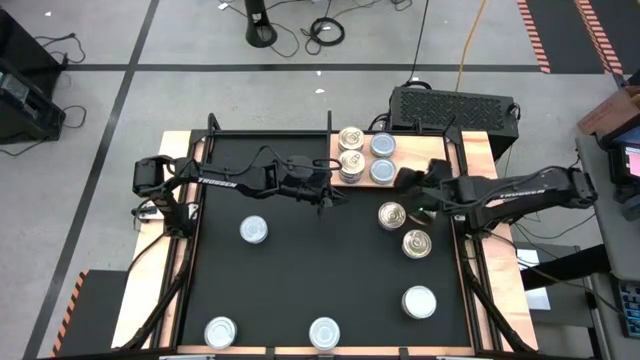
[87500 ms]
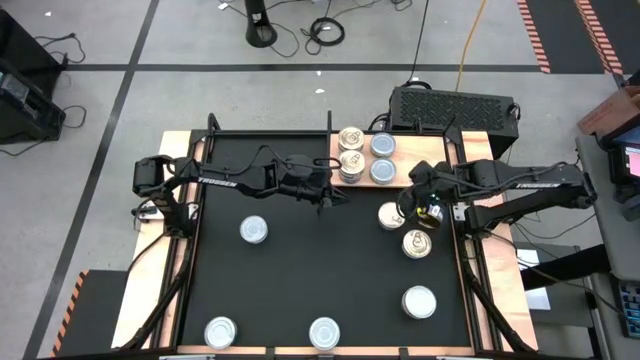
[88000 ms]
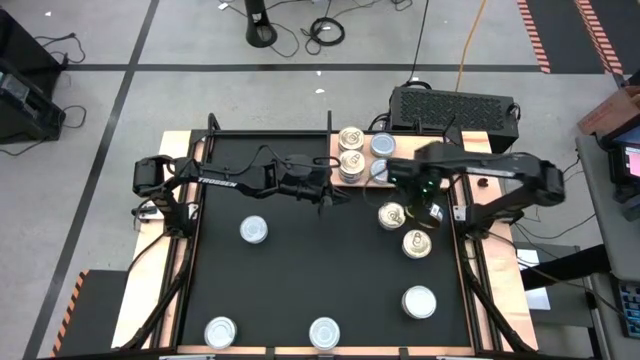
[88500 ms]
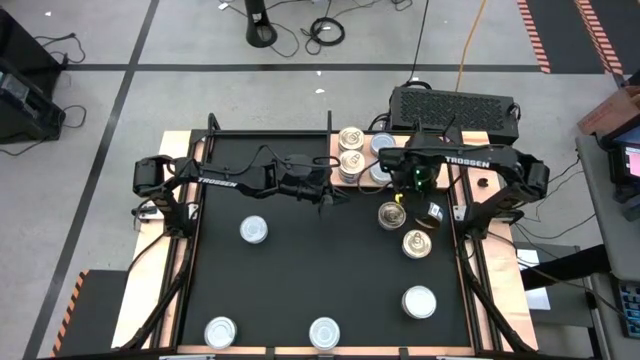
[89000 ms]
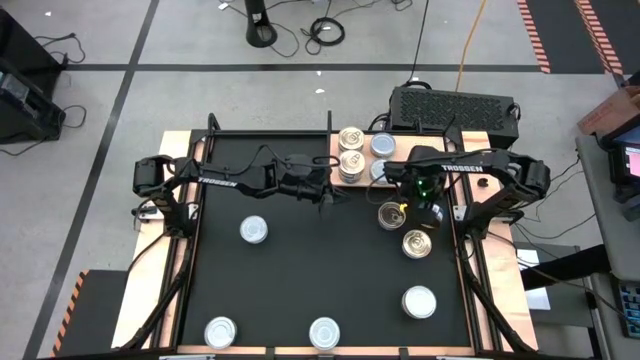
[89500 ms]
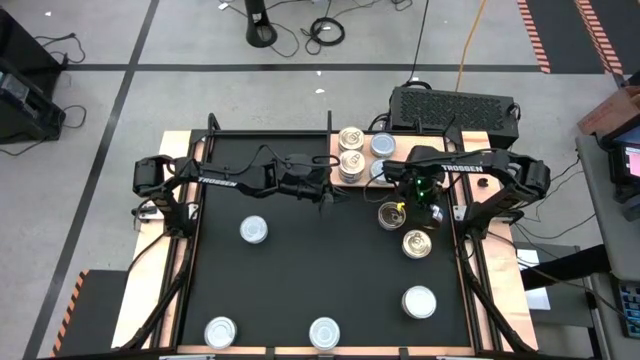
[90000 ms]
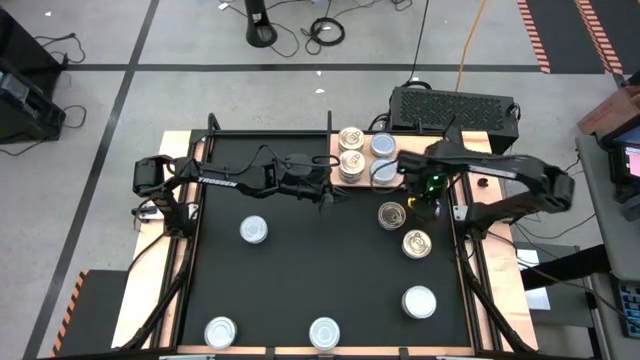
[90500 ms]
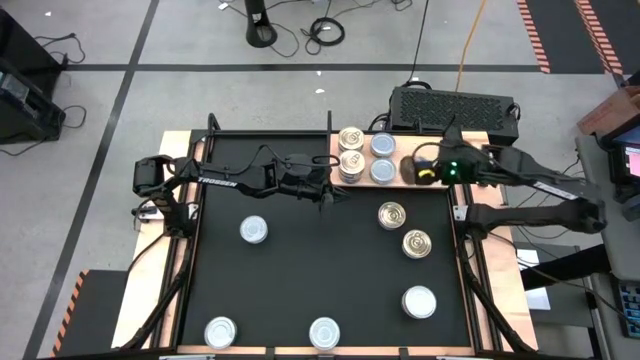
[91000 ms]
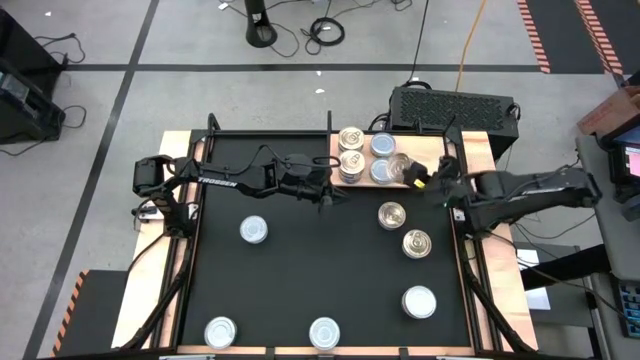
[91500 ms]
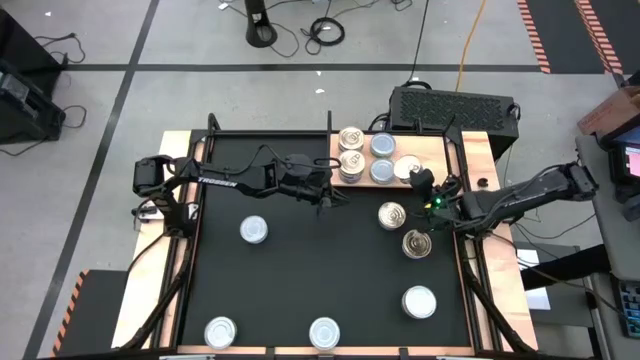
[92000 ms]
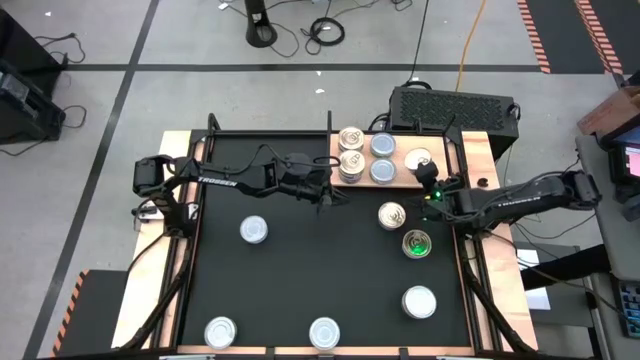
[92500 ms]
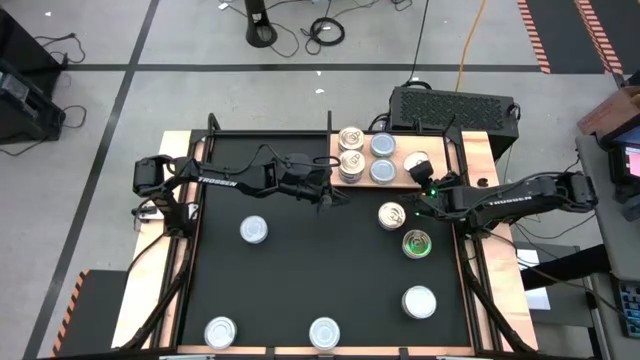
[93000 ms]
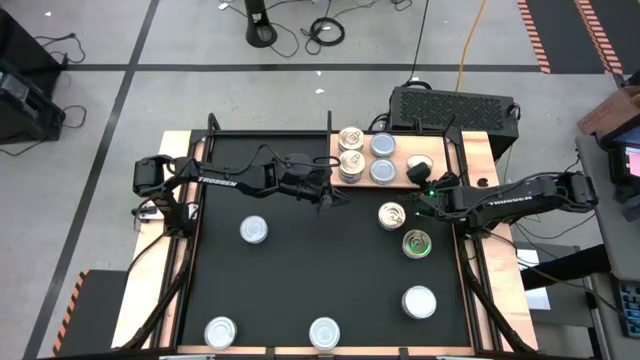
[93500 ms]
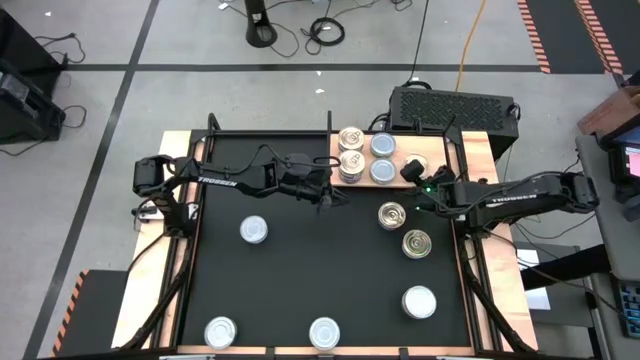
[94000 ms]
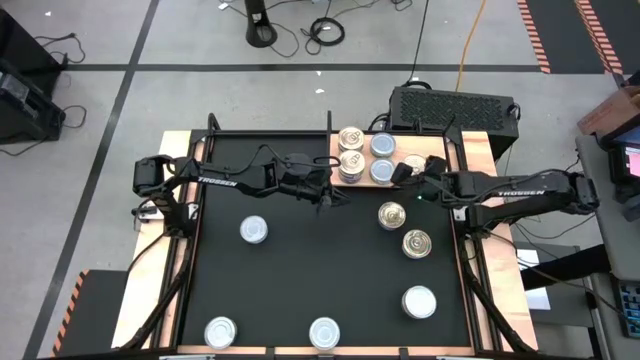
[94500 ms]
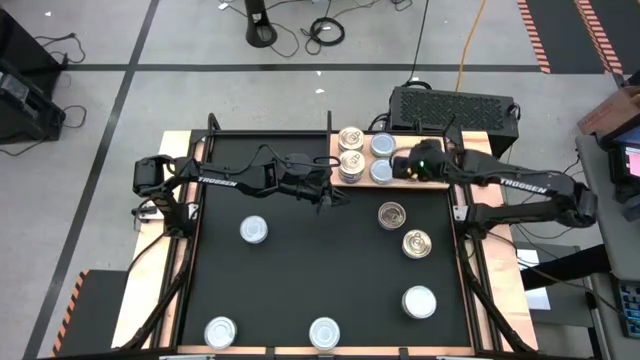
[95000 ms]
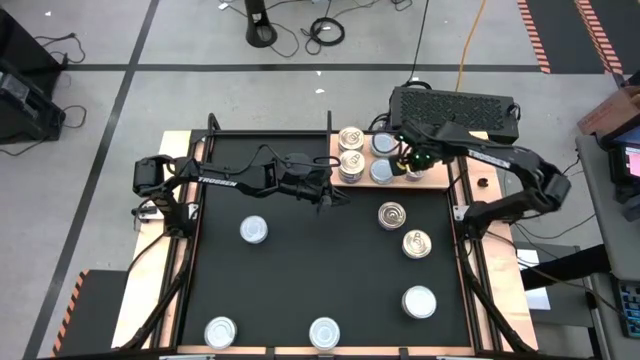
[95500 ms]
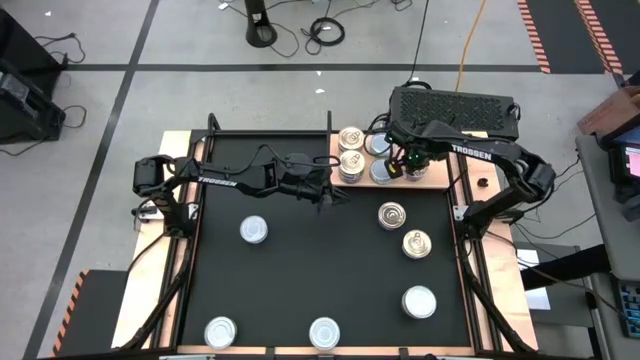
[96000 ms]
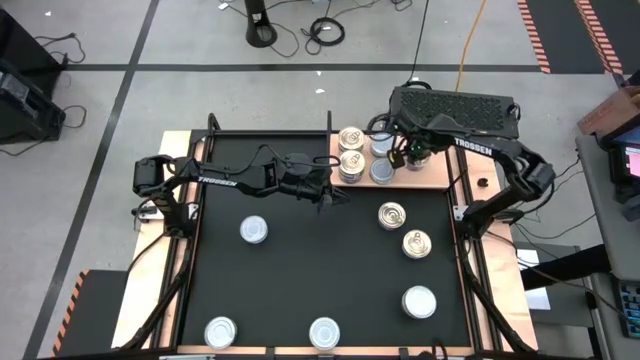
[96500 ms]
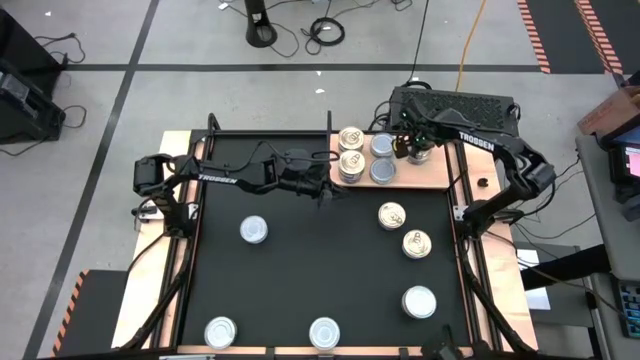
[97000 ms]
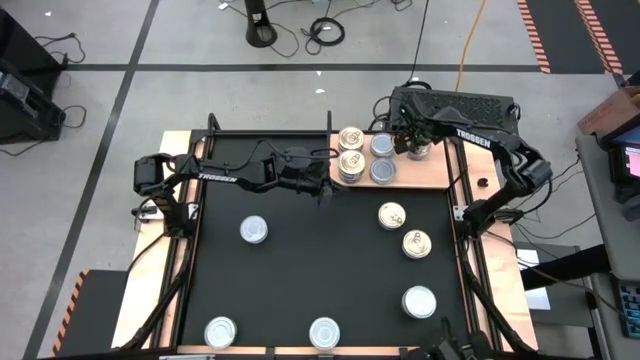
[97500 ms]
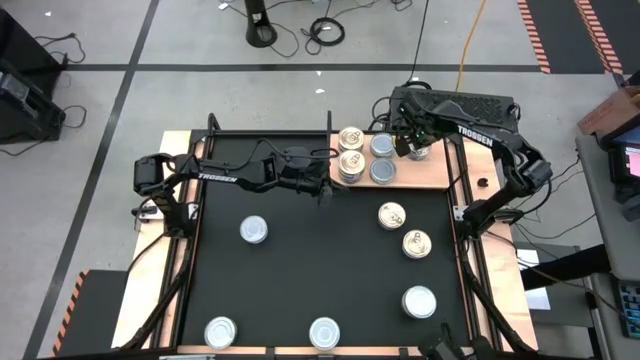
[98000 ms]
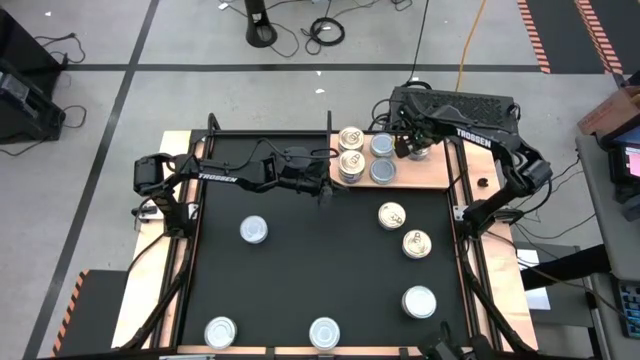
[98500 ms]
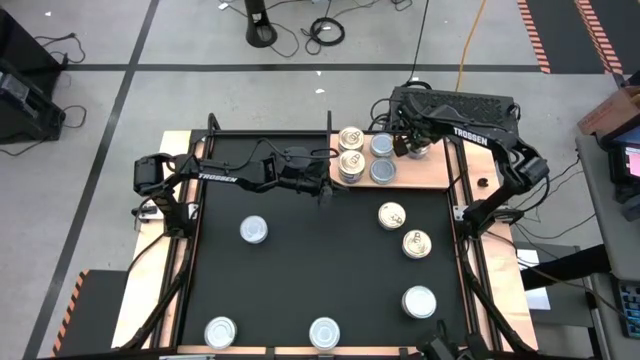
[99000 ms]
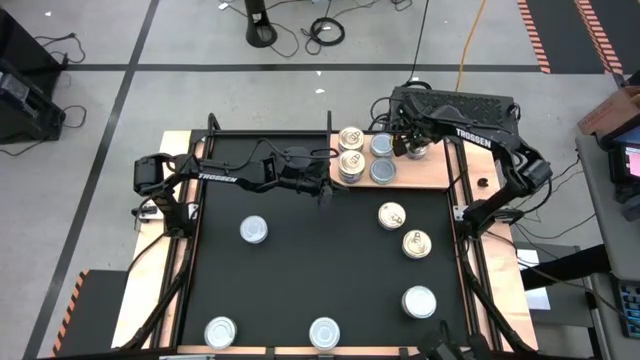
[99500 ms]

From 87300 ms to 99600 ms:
Task: Stack canned seafood by type on shelf
Put the blue pink tuna can on the shelf

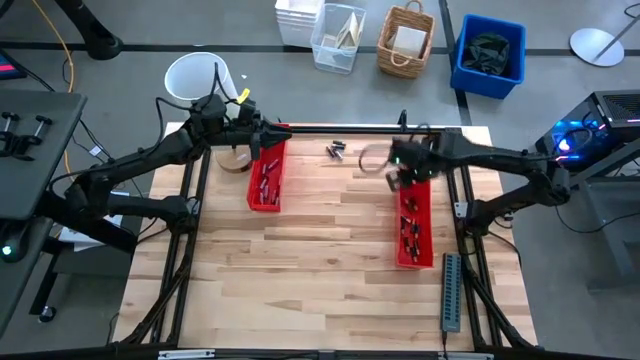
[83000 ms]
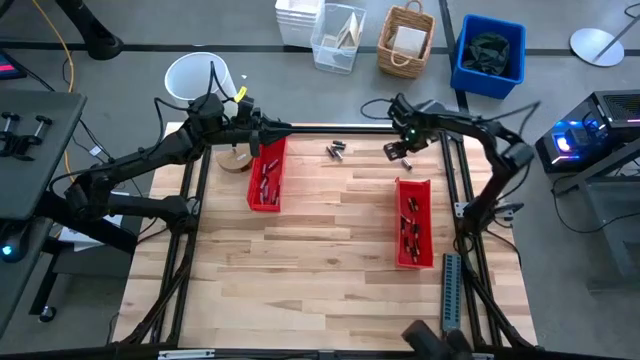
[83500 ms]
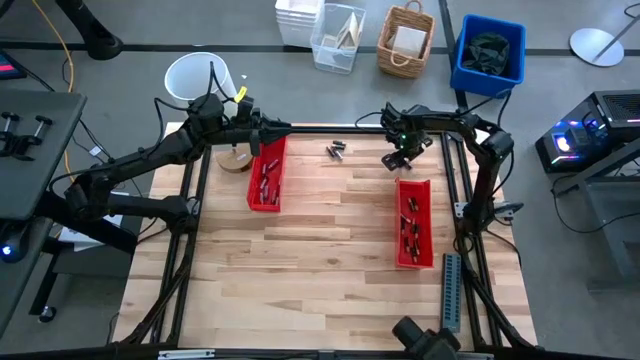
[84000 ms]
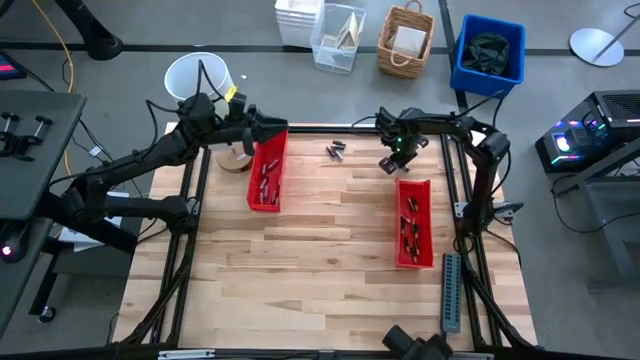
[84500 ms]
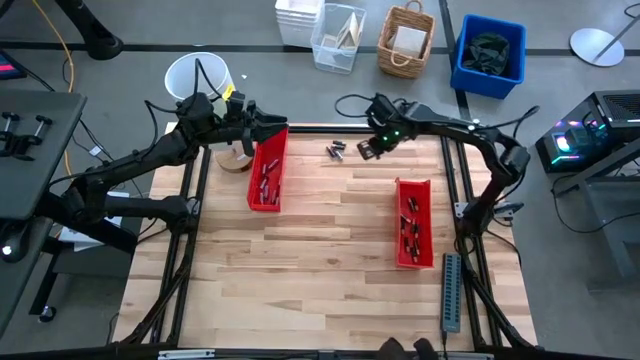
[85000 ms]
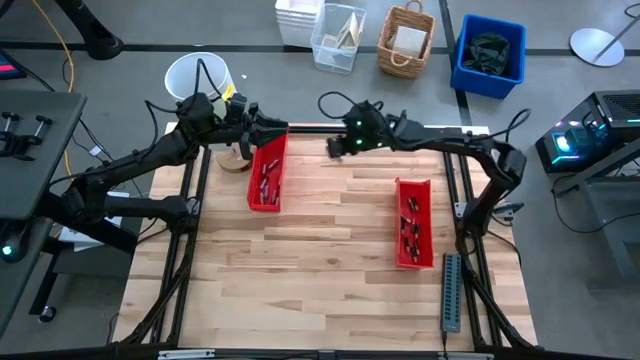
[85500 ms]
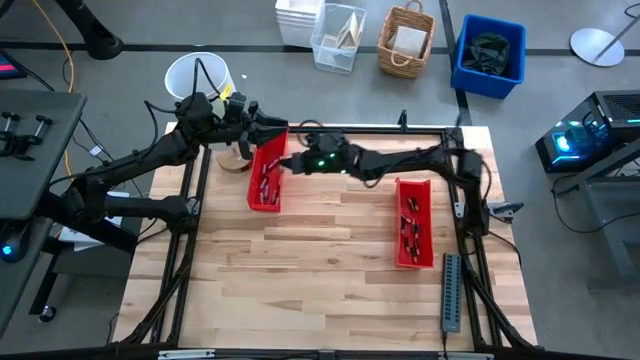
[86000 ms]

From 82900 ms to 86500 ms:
Task: Sort batteries
Put the silver battery into the top red bin

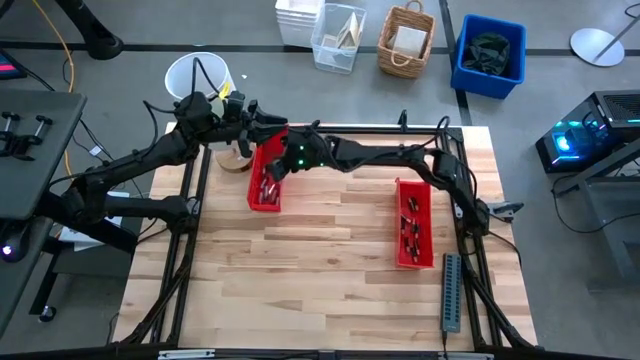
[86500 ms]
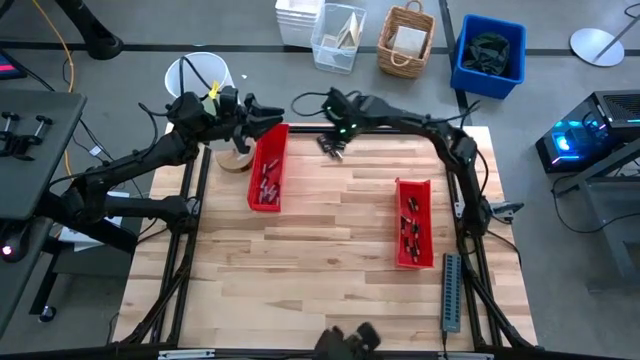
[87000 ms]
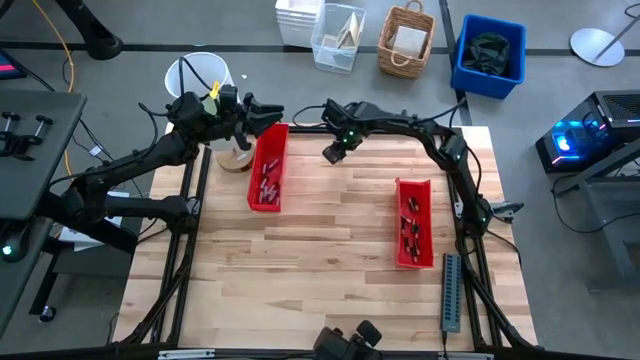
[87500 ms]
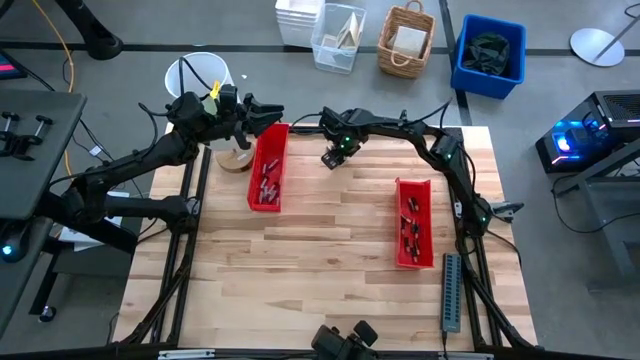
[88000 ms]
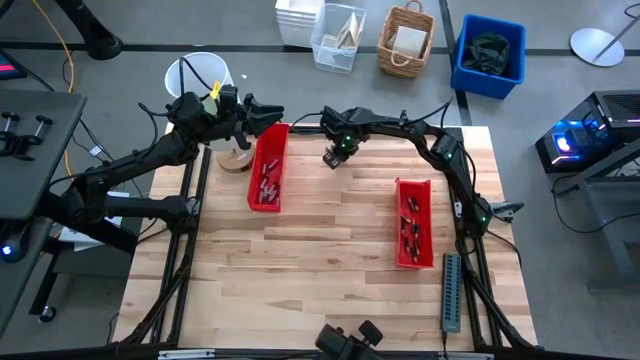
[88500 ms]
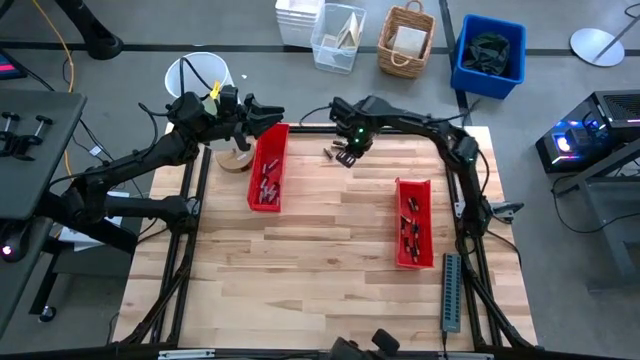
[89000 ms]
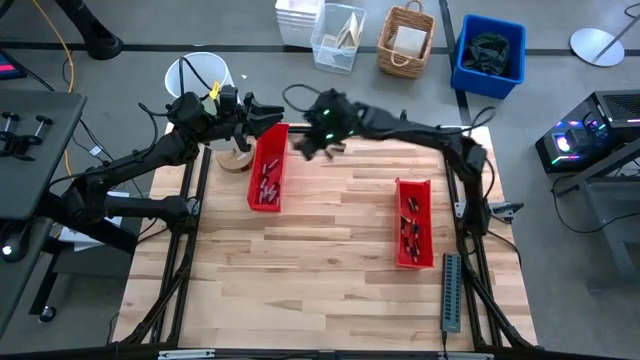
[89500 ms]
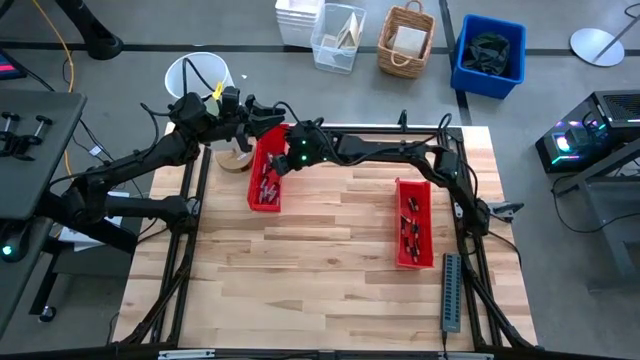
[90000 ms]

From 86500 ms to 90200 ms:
Put the silver battery into the top red bin

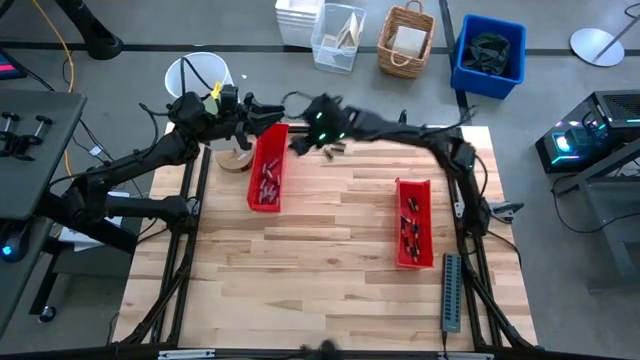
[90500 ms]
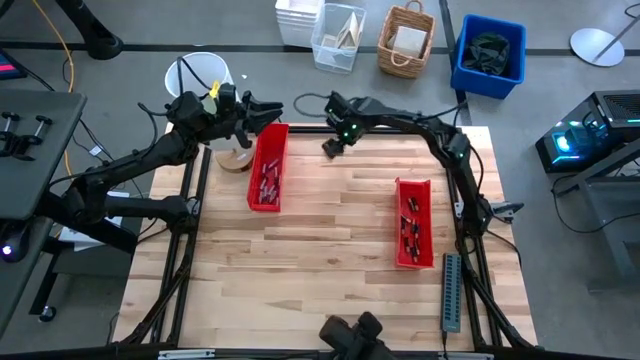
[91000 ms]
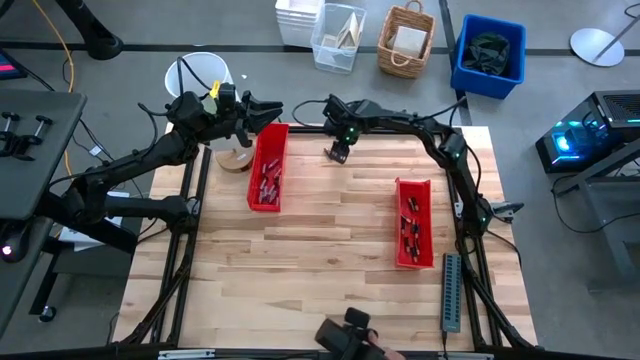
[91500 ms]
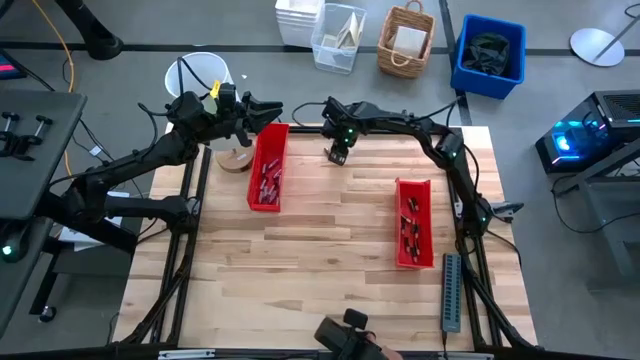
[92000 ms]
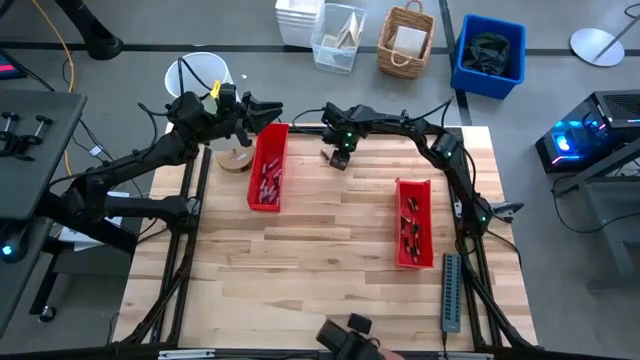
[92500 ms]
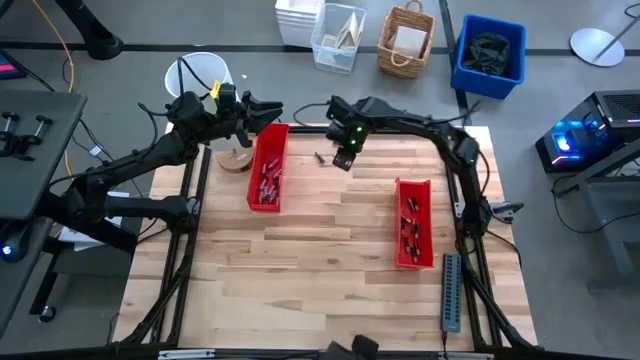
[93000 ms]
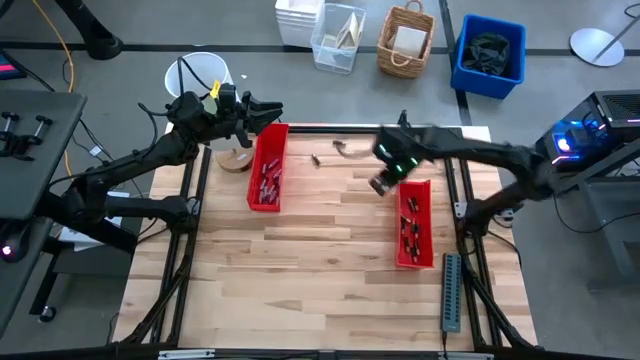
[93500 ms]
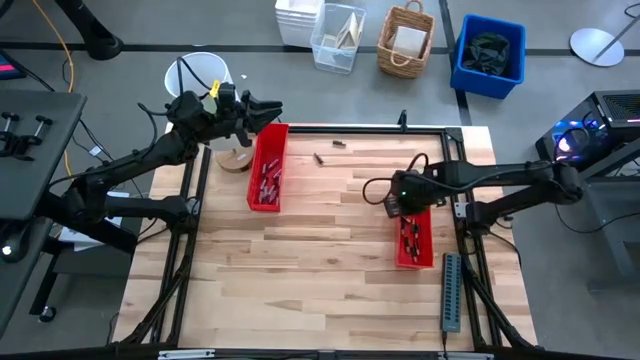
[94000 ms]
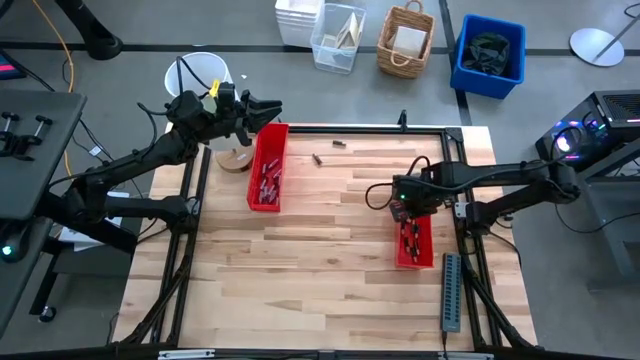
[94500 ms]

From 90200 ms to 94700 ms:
Put the black battery into the bottom red bin
